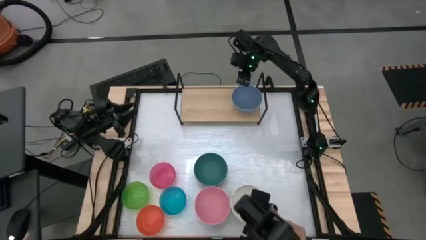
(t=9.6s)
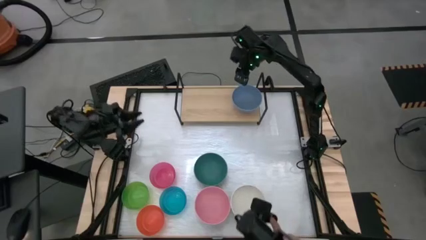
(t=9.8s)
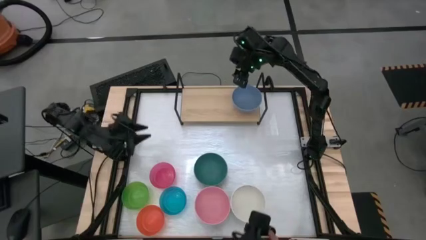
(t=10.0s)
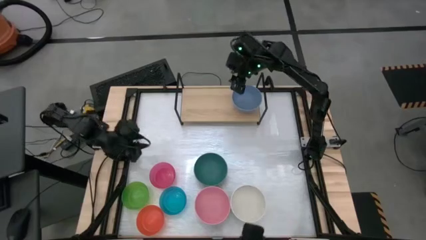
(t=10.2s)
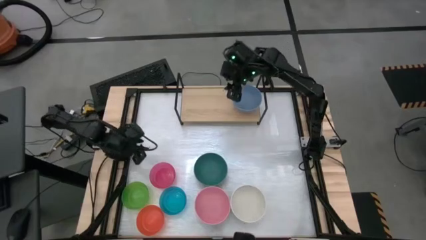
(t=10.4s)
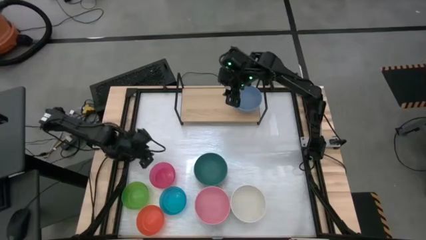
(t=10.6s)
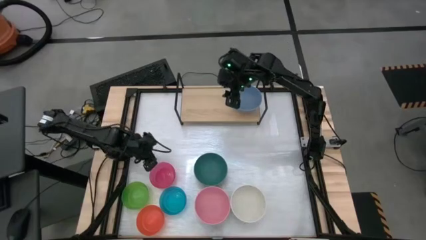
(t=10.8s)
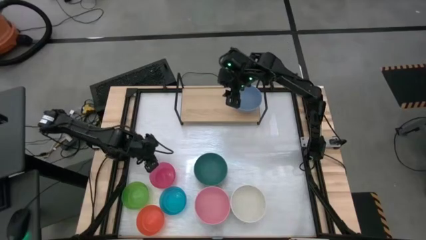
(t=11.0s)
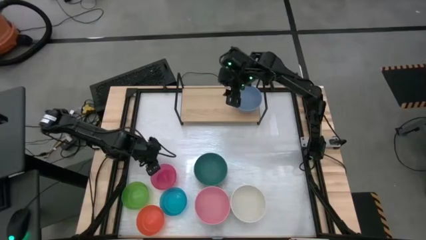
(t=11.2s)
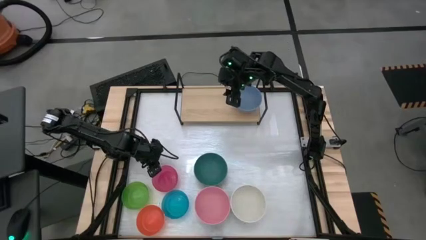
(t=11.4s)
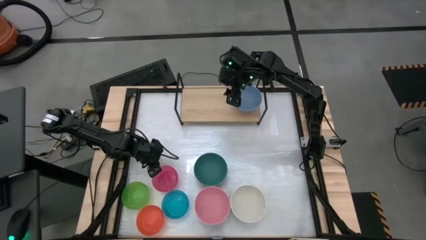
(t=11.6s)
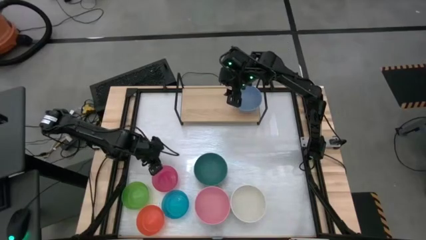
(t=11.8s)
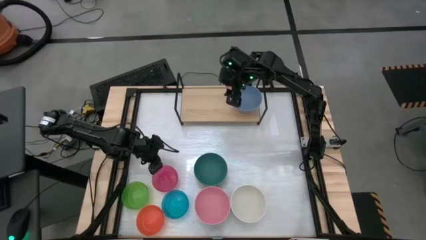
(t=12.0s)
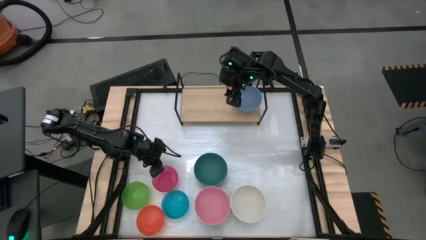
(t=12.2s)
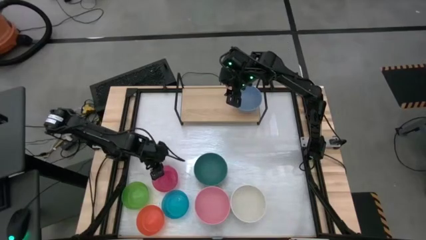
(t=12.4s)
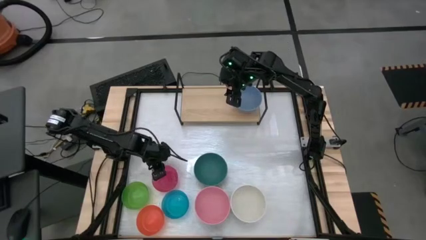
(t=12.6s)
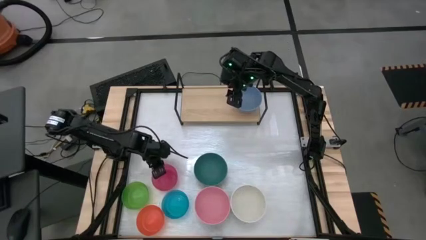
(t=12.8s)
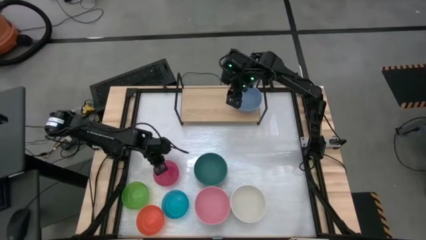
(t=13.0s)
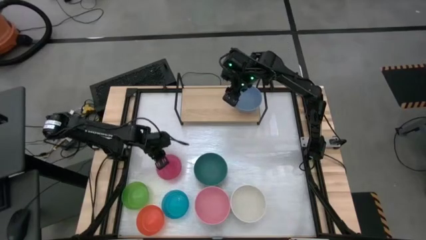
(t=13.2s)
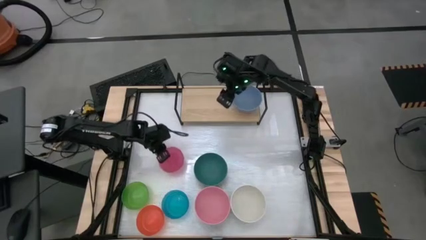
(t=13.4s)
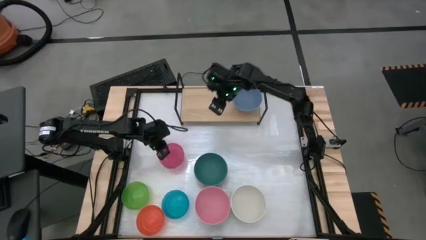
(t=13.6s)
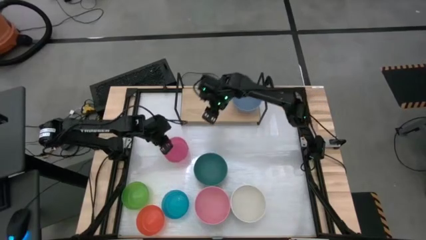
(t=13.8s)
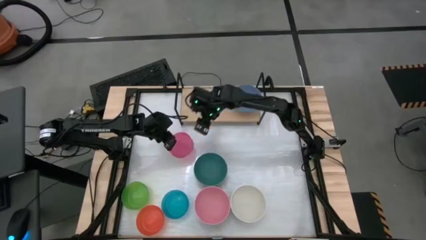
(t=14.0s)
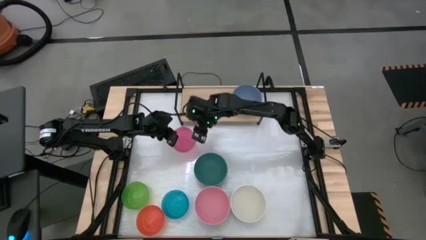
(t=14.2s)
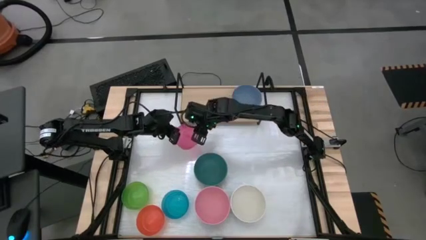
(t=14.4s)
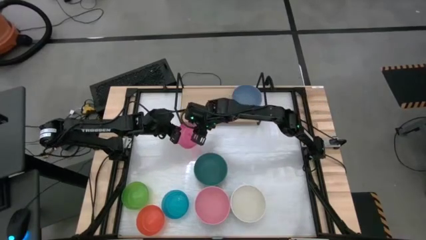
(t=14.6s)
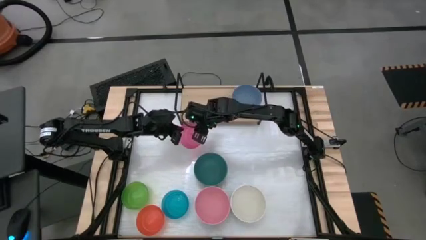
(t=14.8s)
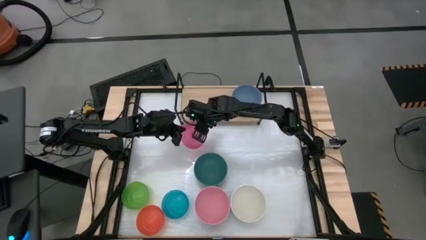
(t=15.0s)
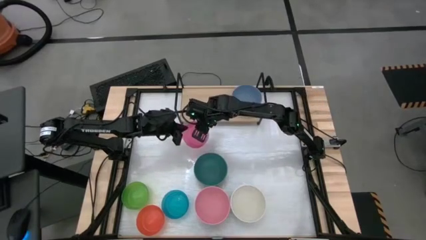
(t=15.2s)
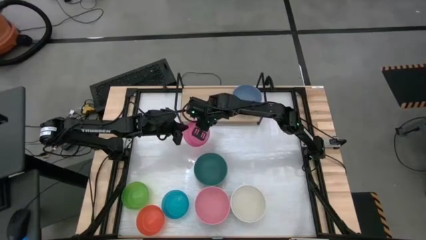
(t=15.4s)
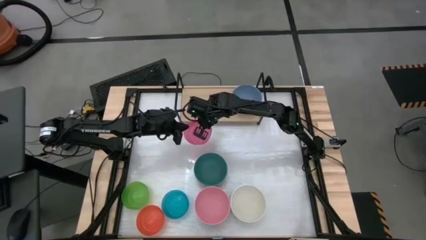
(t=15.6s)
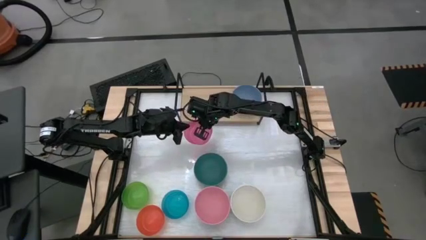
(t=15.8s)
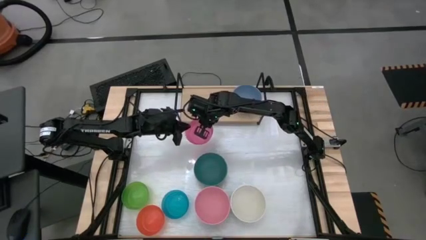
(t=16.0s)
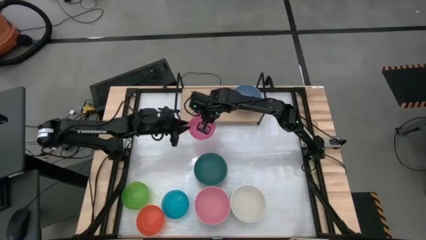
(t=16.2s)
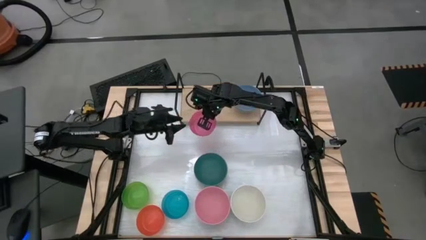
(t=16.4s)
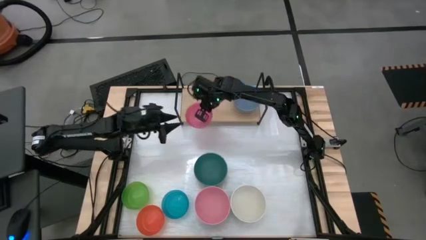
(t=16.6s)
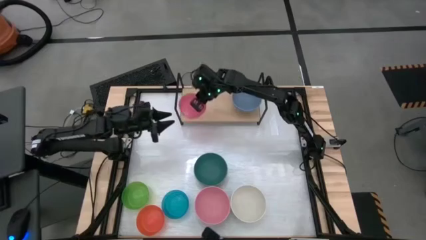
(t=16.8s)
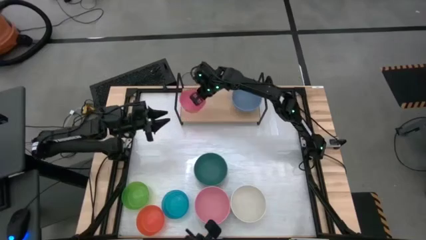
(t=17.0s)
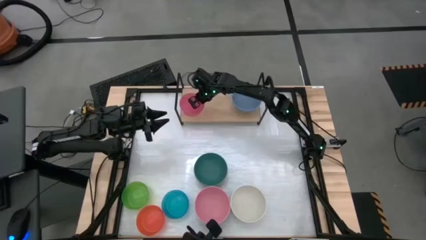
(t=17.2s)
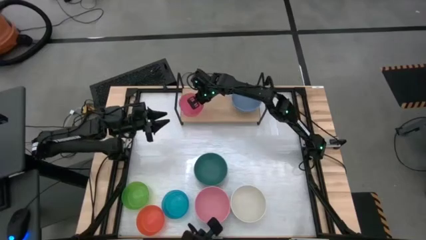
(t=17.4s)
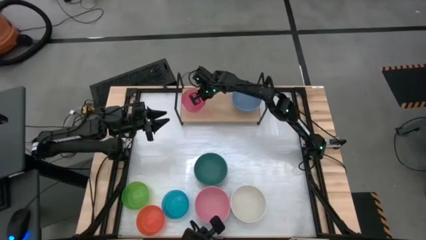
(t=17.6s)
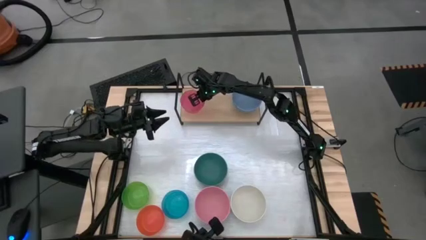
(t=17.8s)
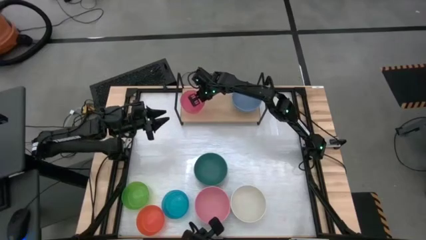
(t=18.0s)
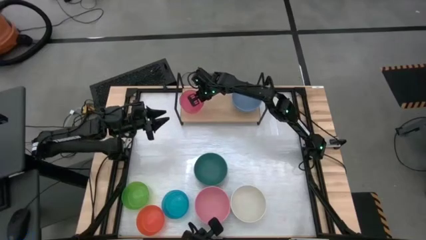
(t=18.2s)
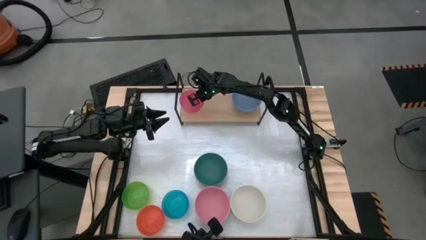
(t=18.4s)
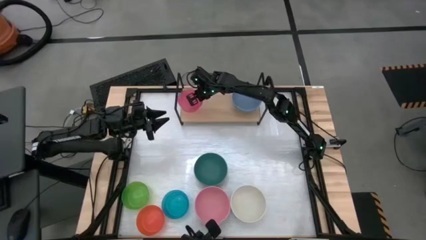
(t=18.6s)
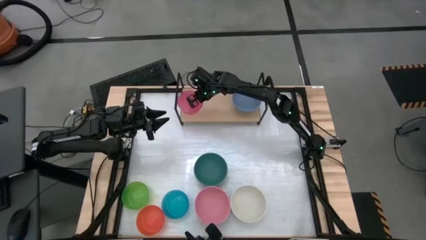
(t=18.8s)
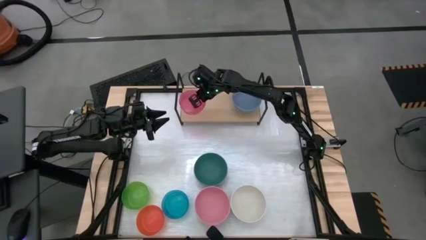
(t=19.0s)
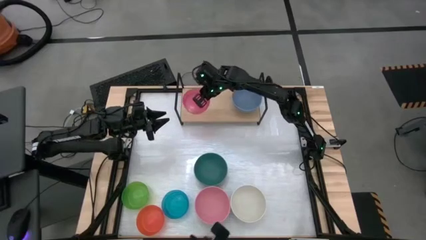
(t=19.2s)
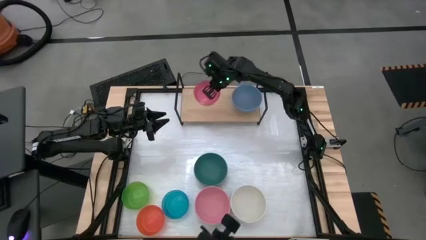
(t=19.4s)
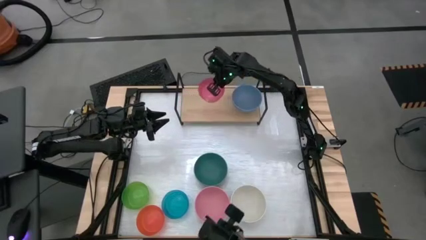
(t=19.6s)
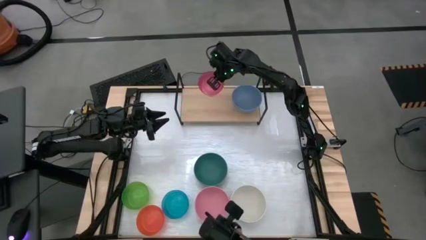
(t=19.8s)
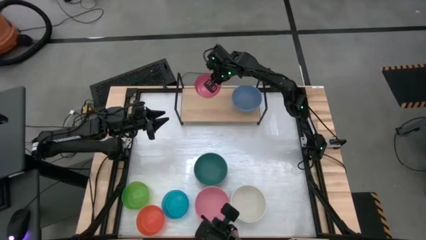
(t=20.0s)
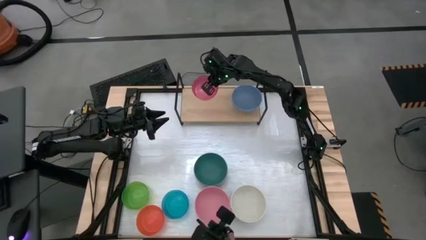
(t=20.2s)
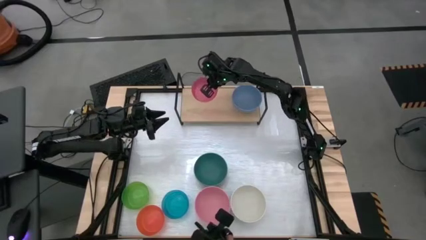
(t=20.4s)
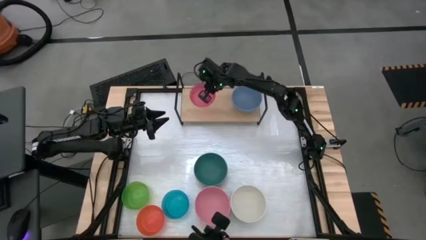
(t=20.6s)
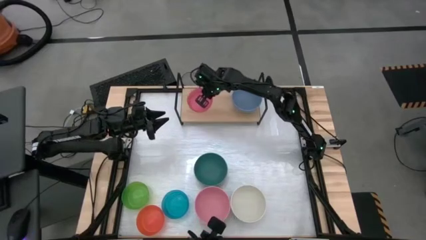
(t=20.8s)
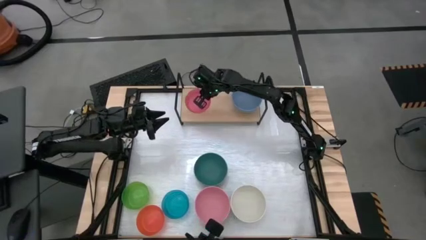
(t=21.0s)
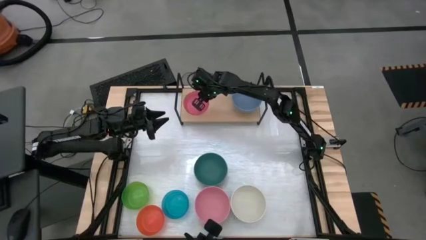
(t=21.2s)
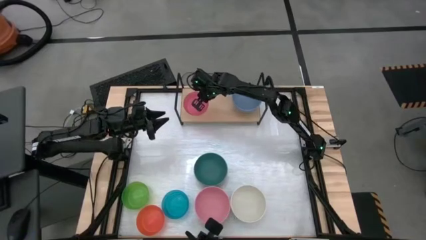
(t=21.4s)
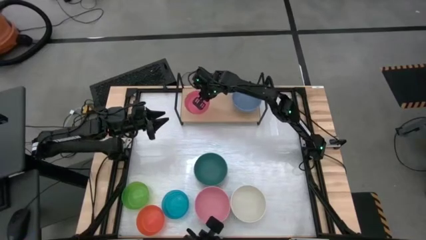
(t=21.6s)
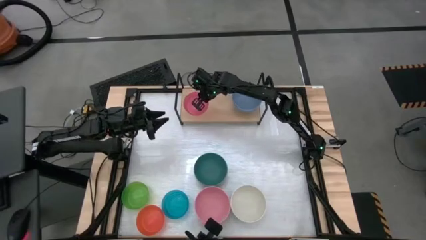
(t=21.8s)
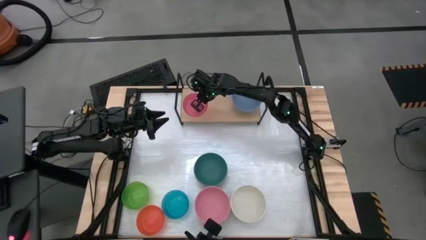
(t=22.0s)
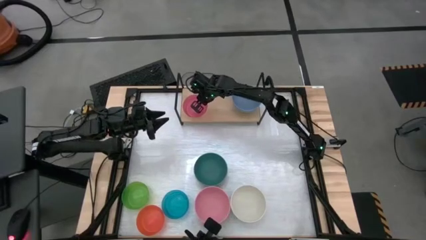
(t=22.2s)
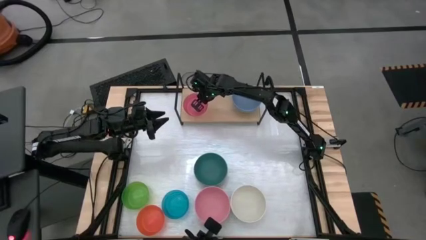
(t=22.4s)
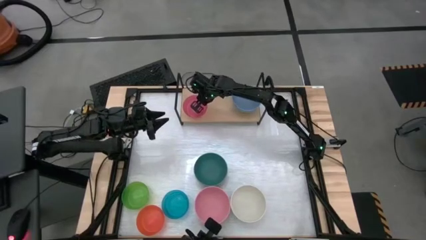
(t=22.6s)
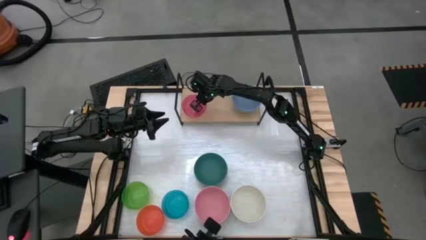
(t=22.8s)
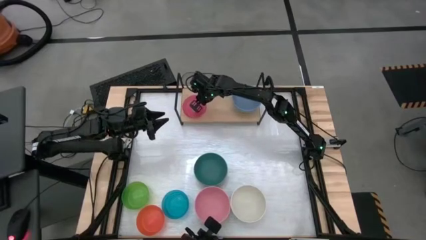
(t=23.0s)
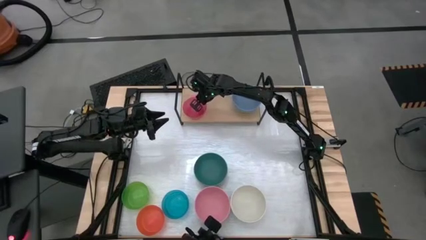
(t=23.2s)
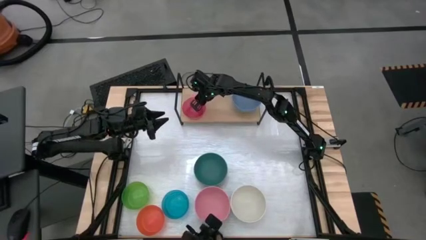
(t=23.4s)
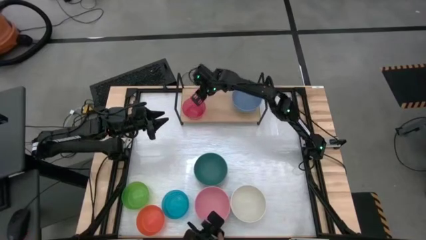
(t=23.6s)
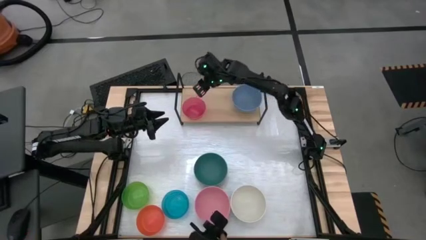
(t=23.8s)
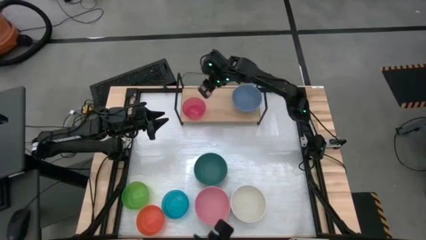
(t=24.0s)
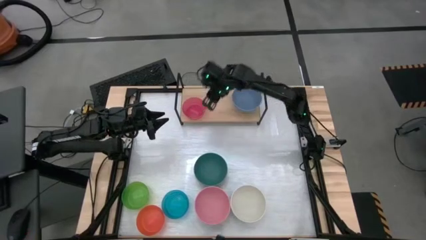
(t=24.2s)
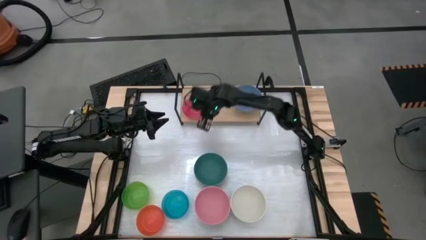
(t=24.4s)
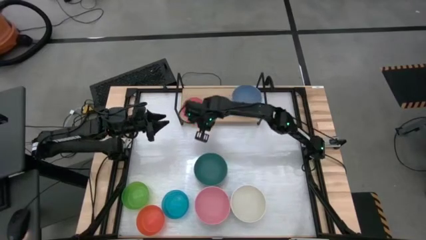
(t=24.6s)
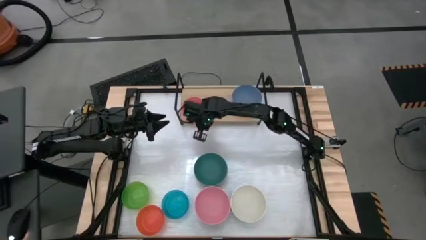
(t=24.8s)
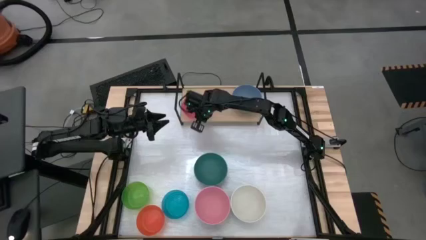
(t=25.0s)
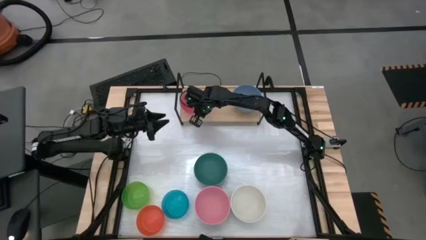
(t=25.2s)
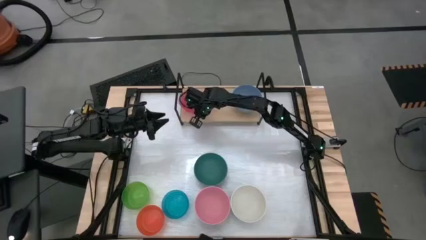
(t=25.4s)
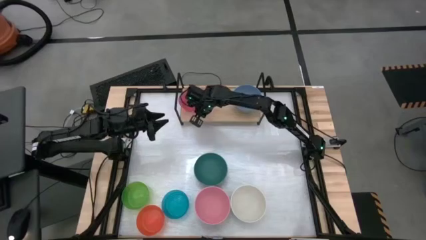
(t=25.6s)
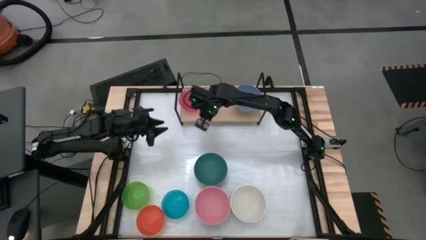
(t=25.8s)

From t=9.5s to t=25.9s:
Task: Place and stack bowls onto a shelf
Put the small pink bowl on the shelf
